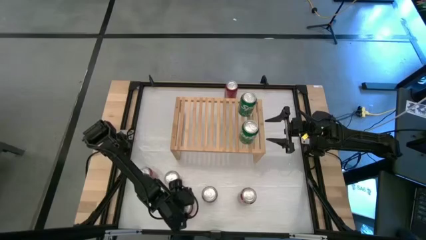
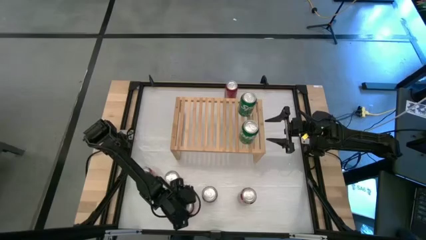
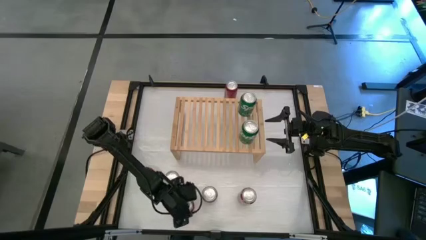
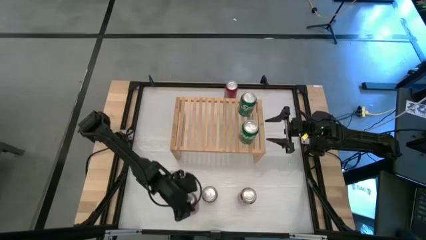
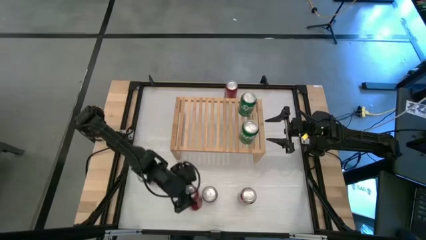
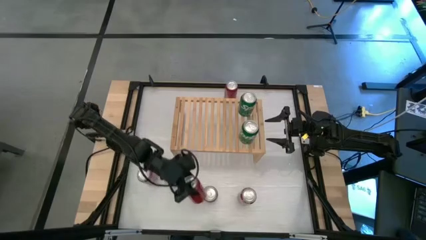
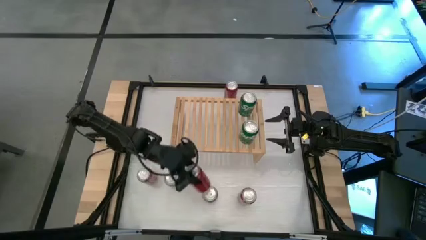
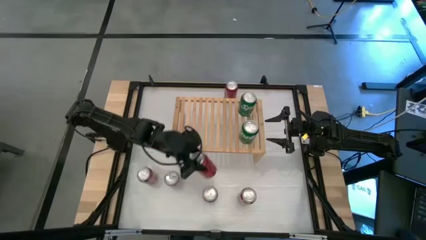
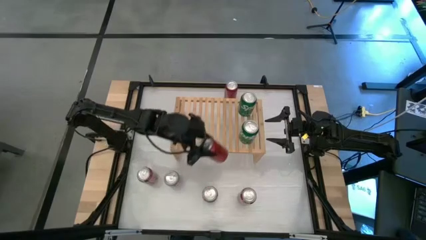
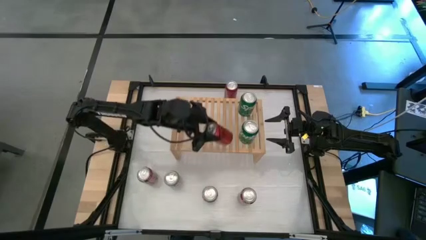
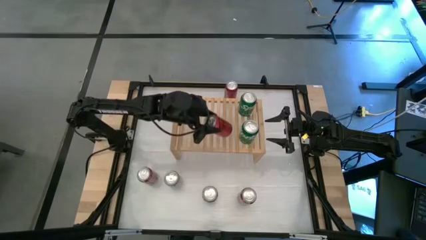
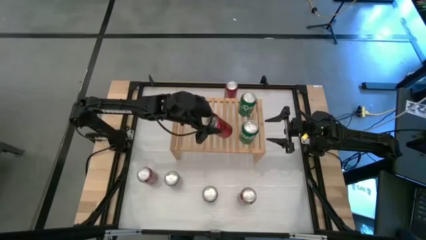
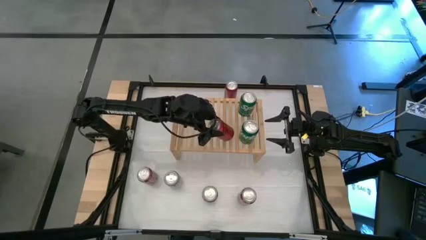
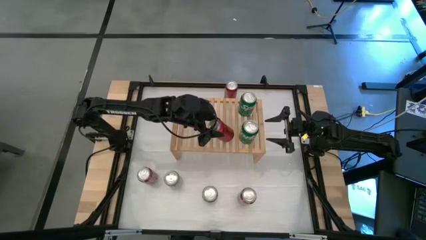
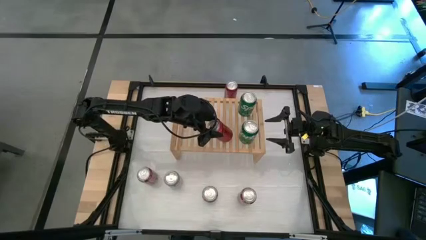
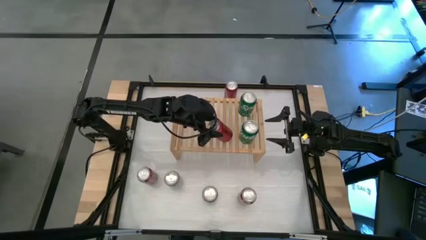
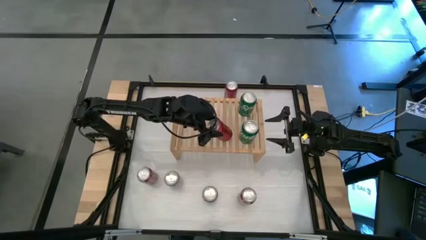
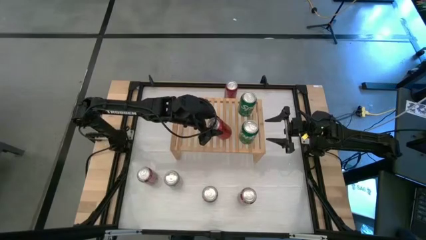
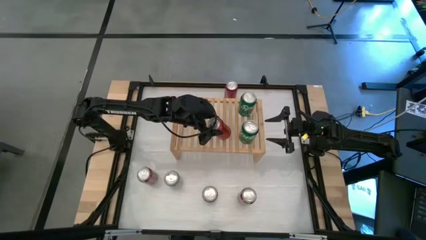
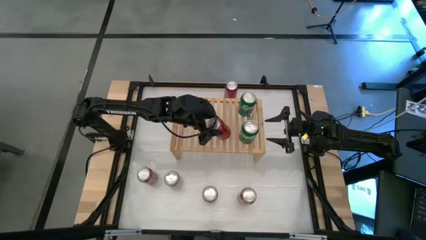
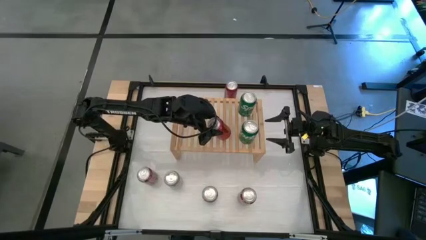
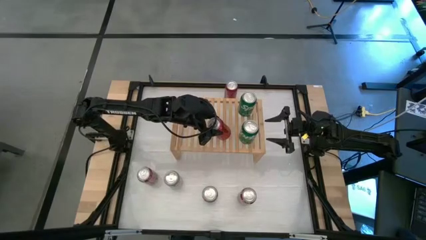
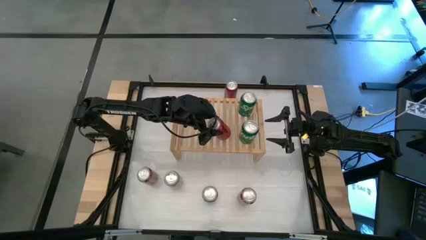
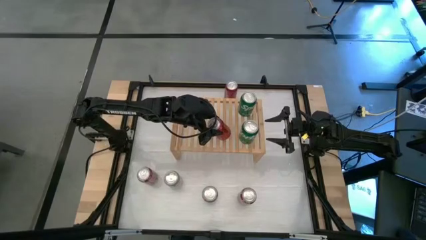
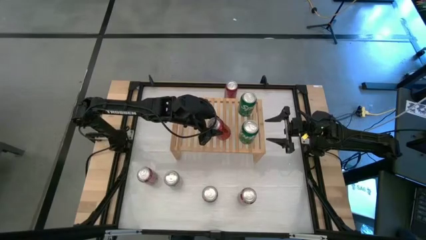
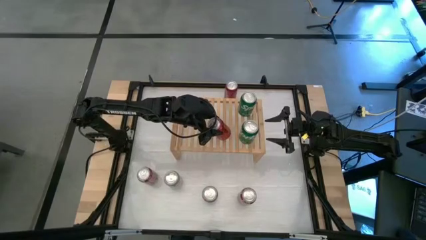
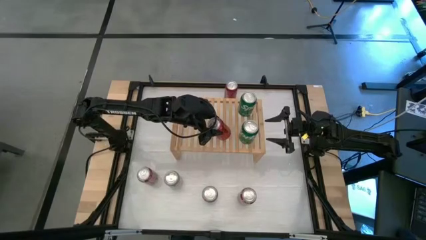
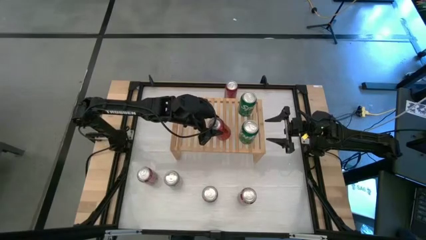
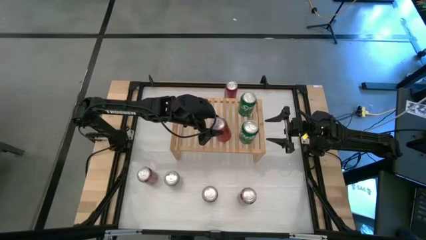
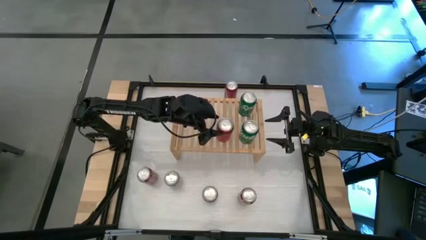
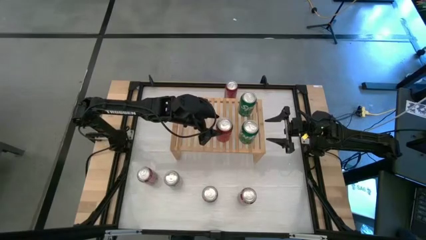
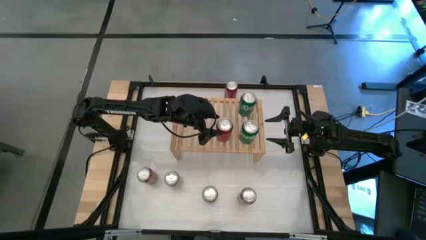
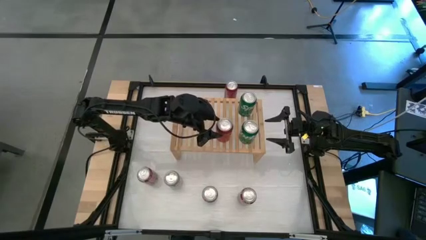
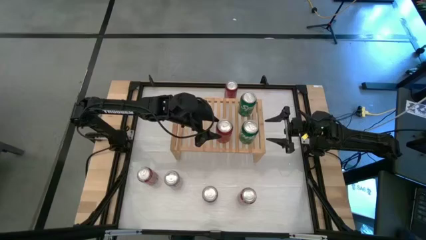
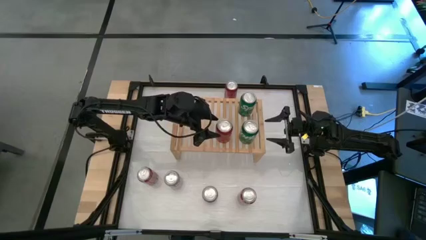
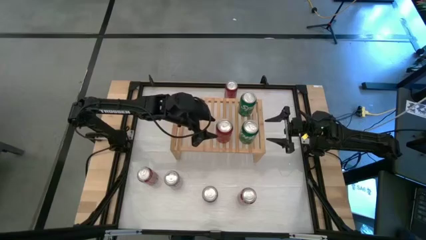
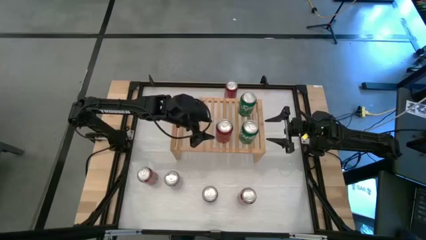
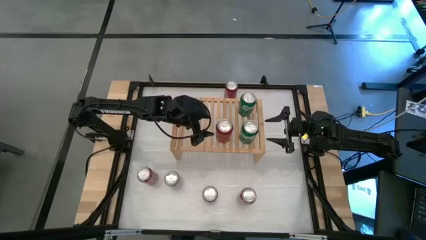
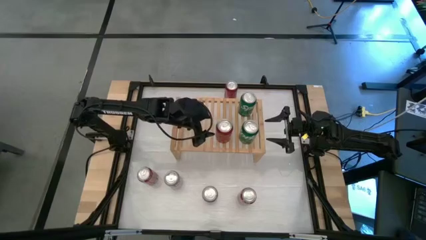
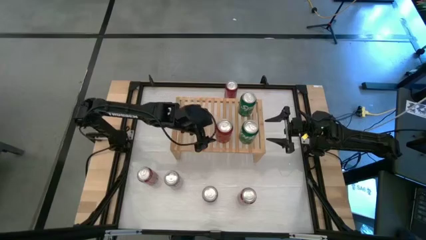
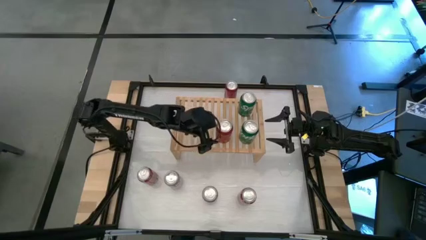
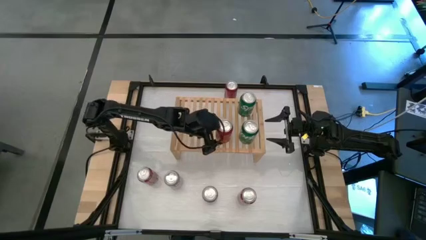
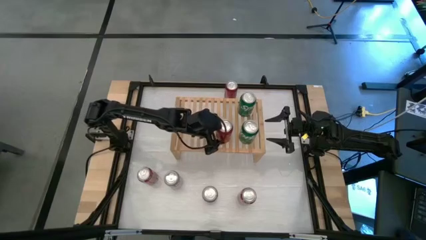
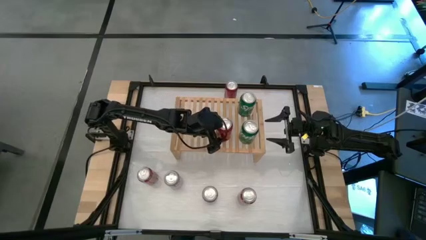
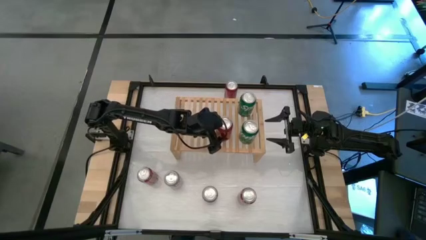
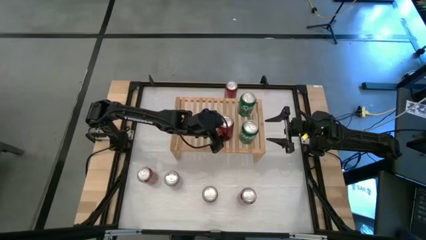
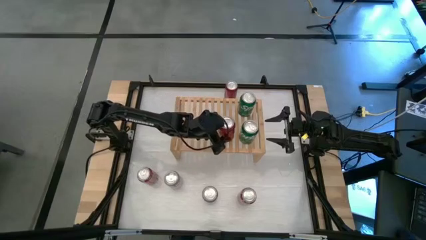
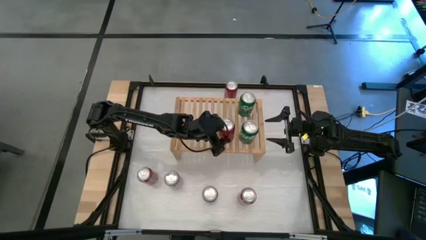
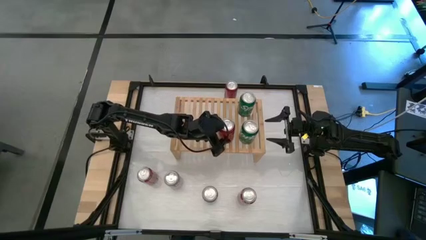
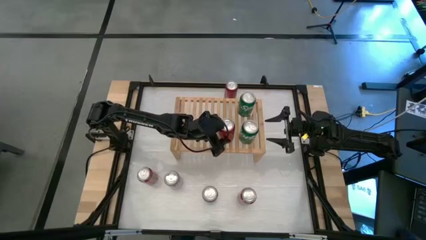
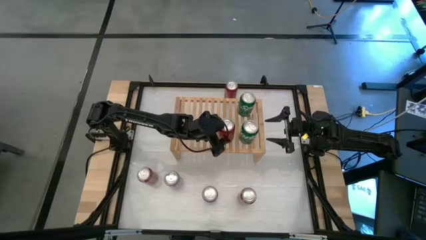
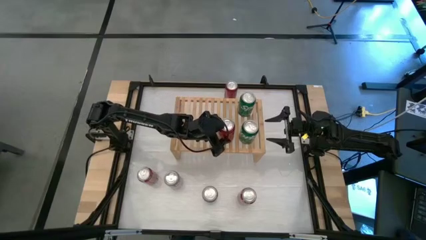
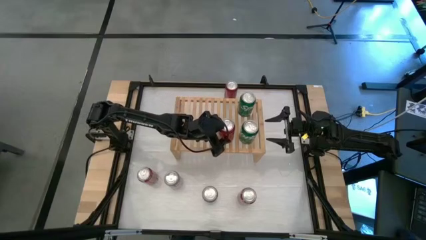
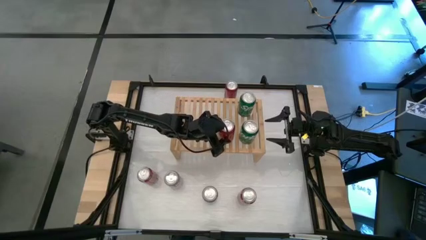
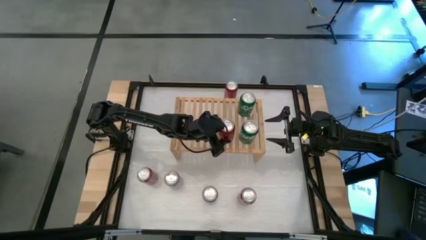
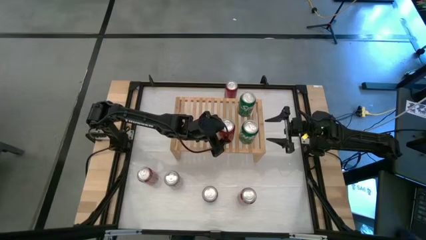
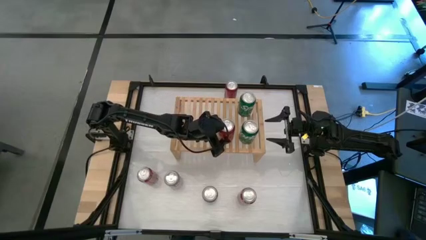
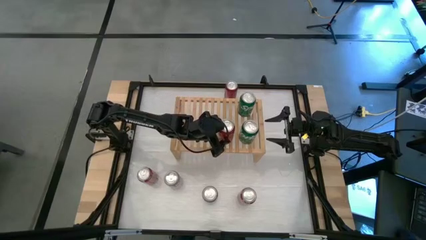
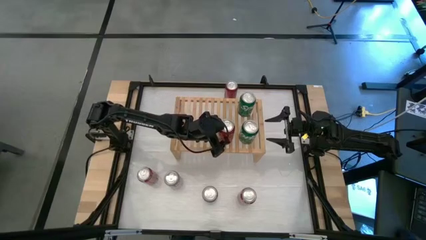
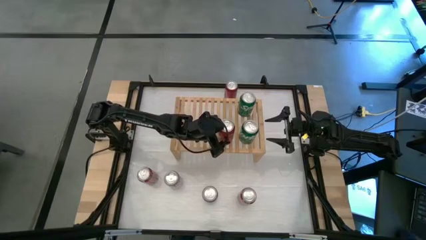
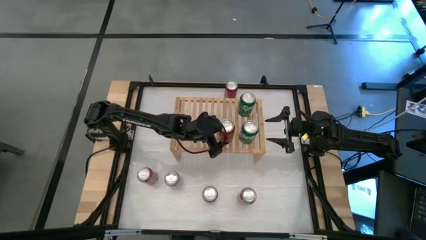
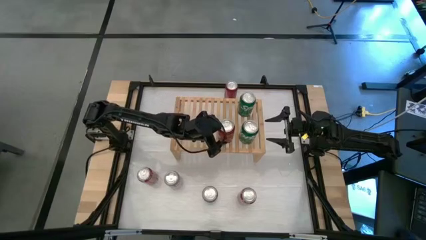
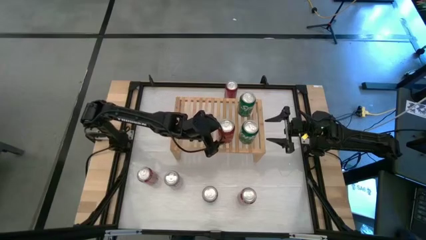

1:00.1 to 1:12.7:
Task: Place canned beverage on shelf
Put the bottom red black soda can on the shelf
